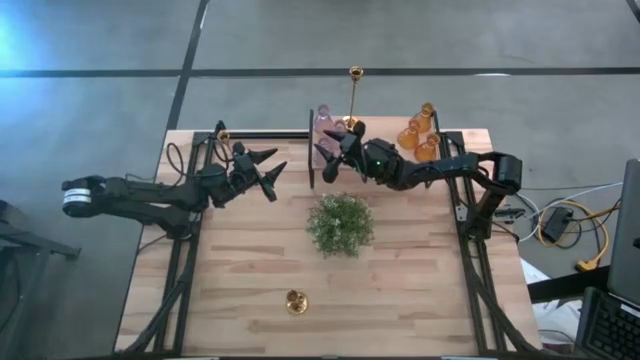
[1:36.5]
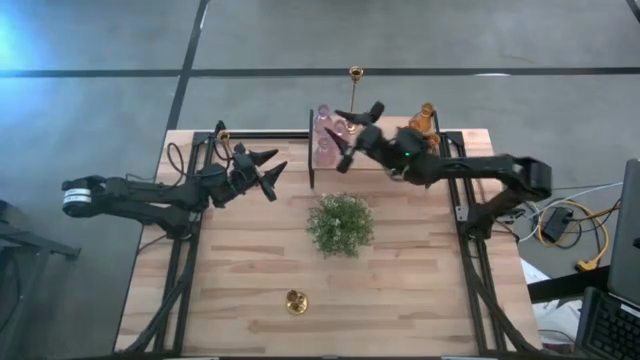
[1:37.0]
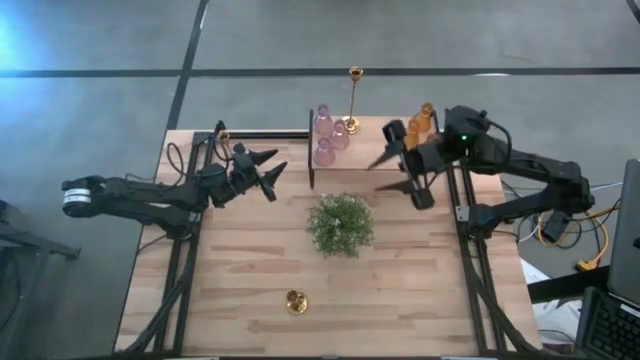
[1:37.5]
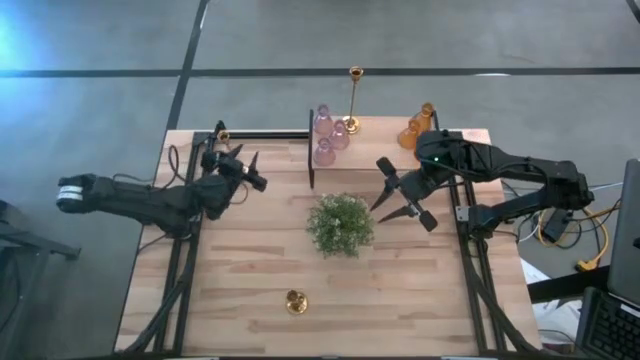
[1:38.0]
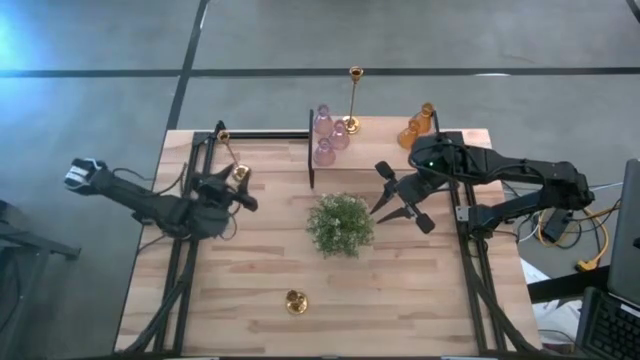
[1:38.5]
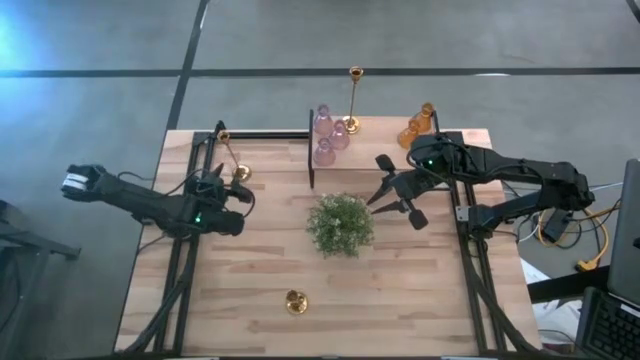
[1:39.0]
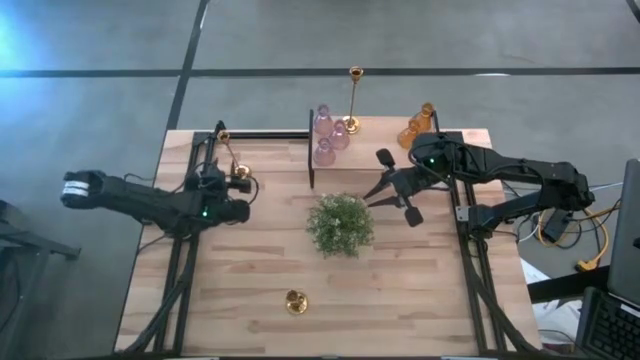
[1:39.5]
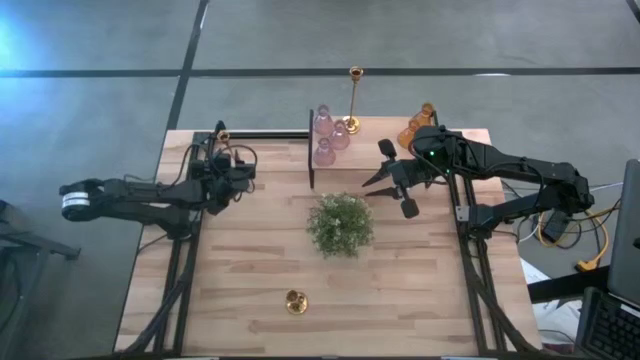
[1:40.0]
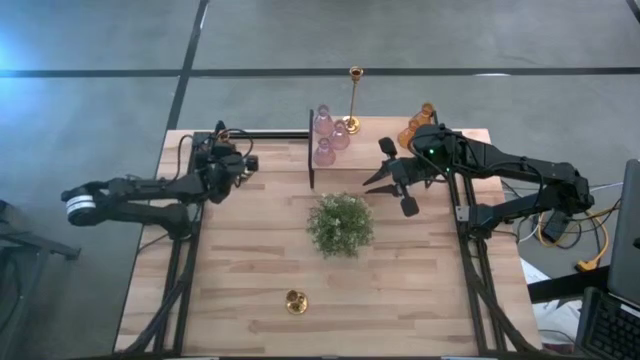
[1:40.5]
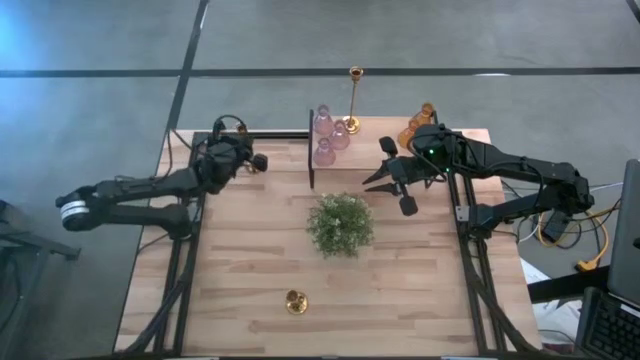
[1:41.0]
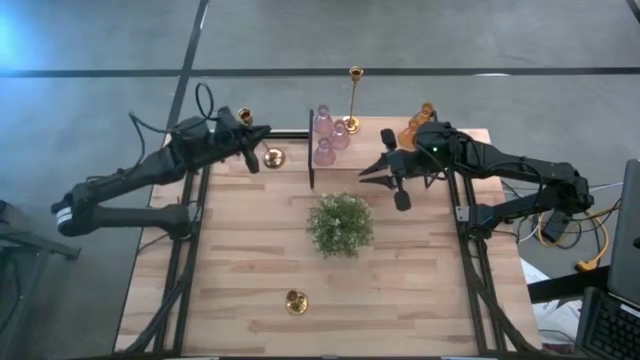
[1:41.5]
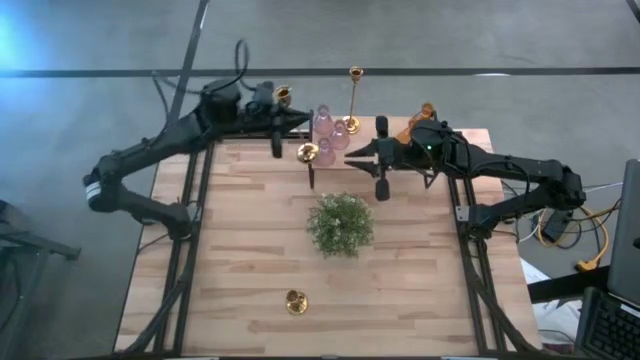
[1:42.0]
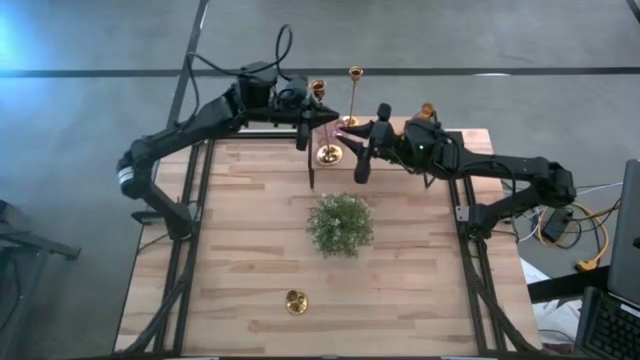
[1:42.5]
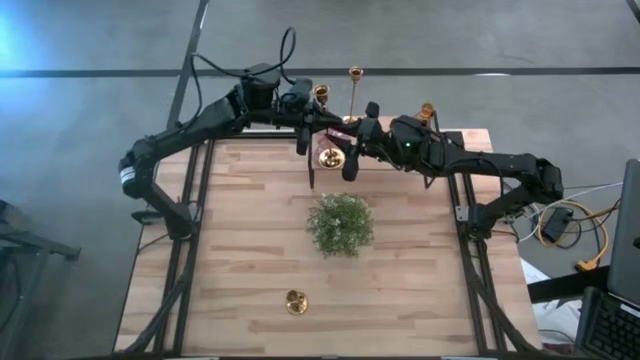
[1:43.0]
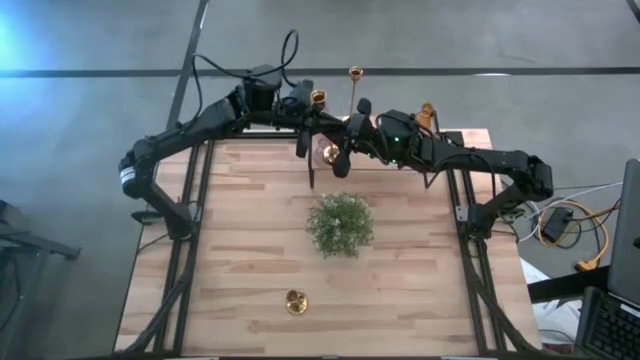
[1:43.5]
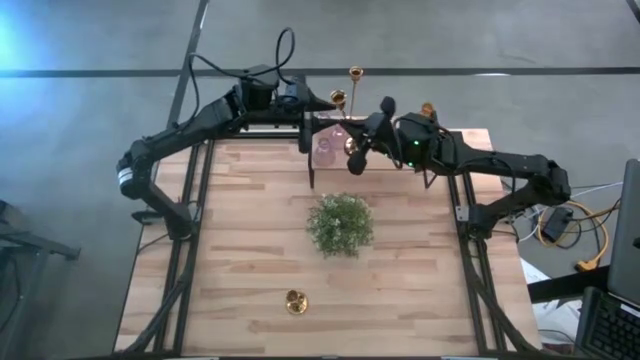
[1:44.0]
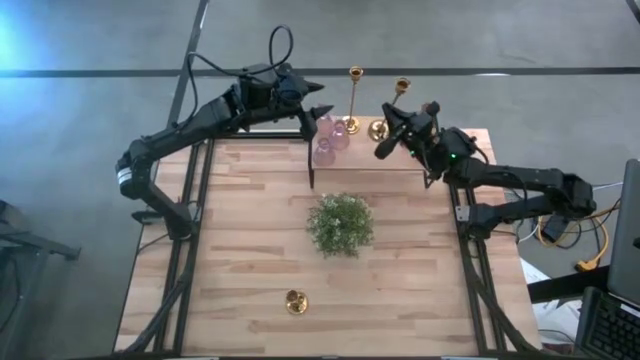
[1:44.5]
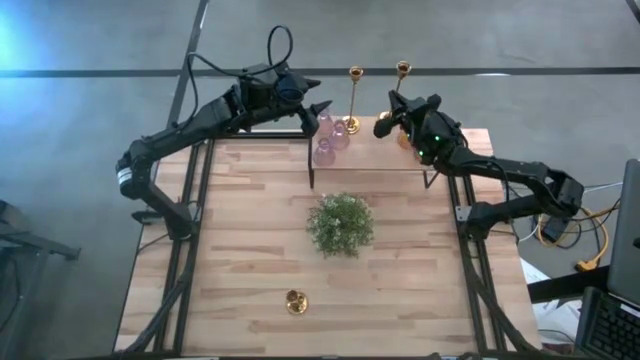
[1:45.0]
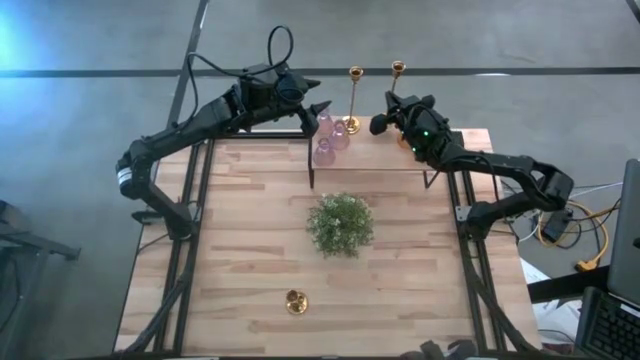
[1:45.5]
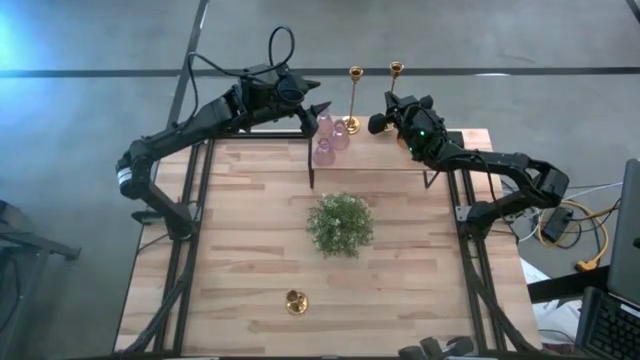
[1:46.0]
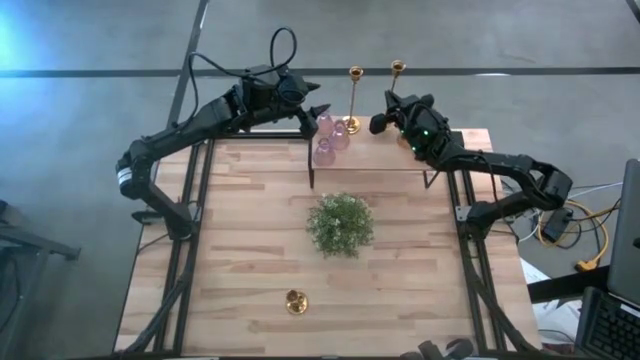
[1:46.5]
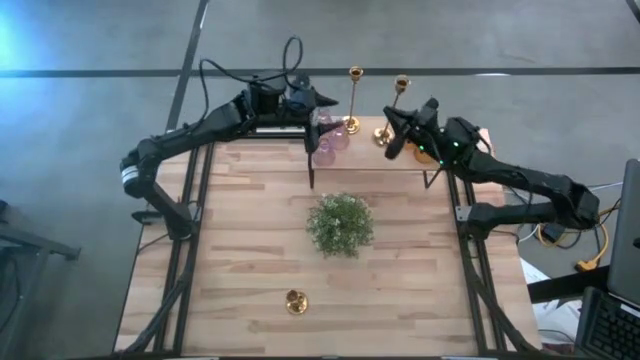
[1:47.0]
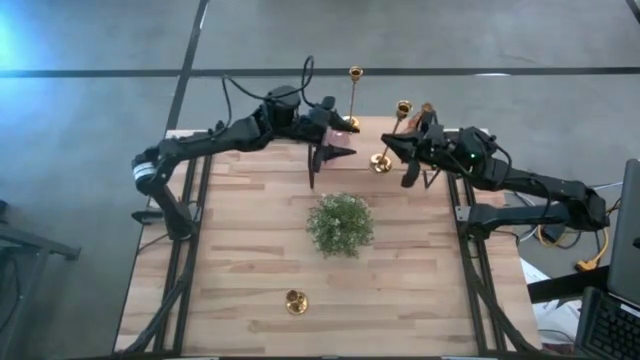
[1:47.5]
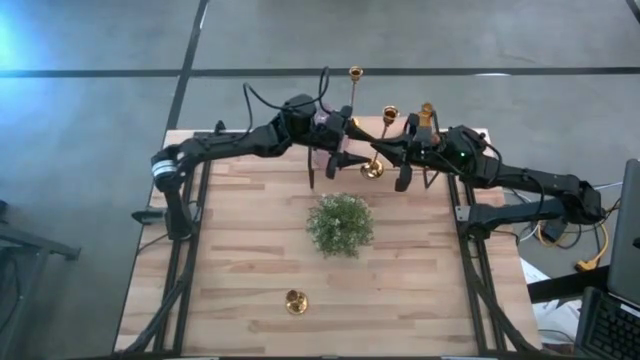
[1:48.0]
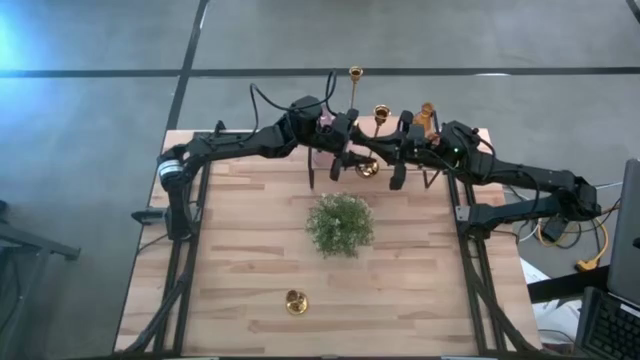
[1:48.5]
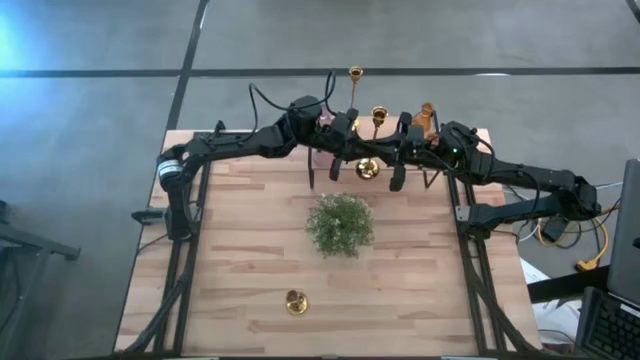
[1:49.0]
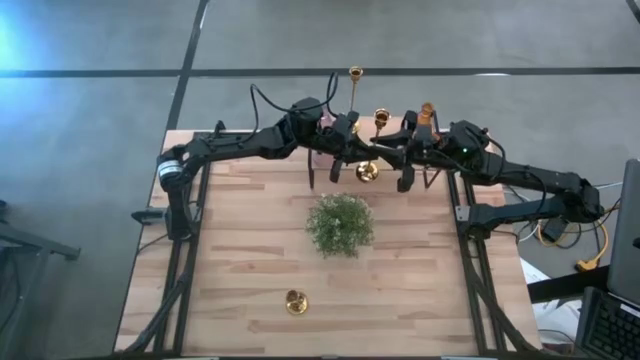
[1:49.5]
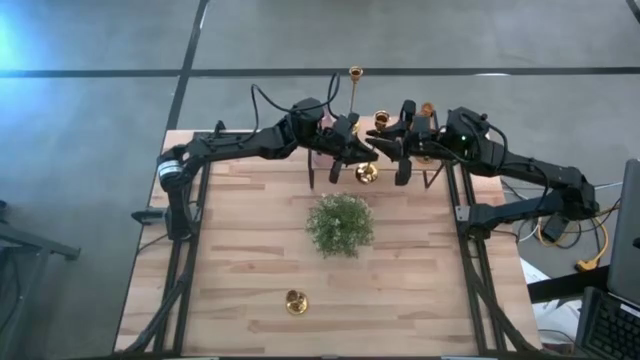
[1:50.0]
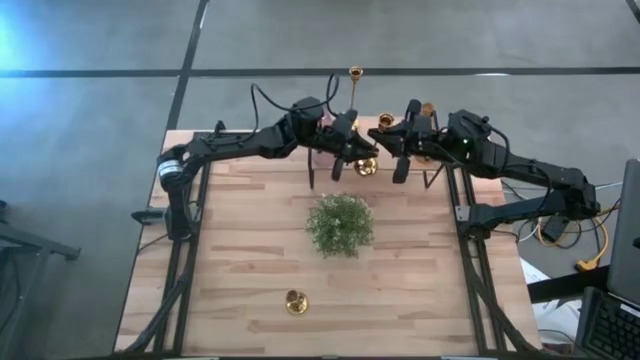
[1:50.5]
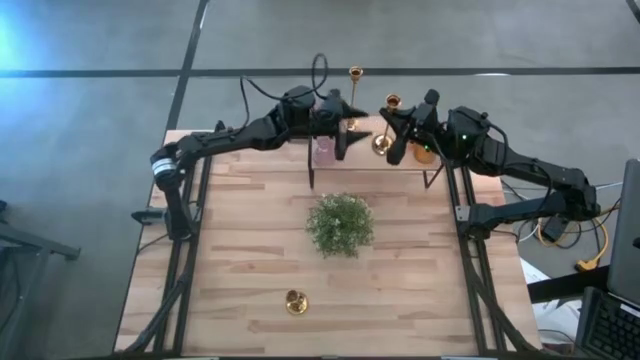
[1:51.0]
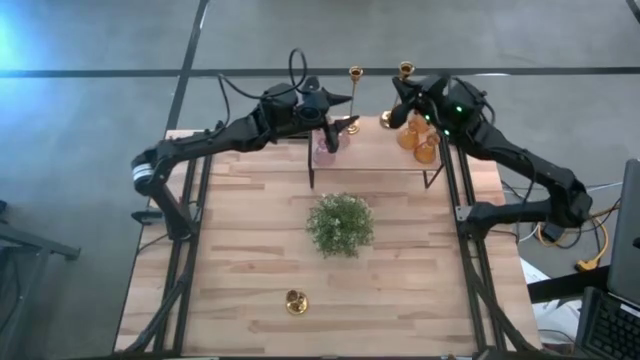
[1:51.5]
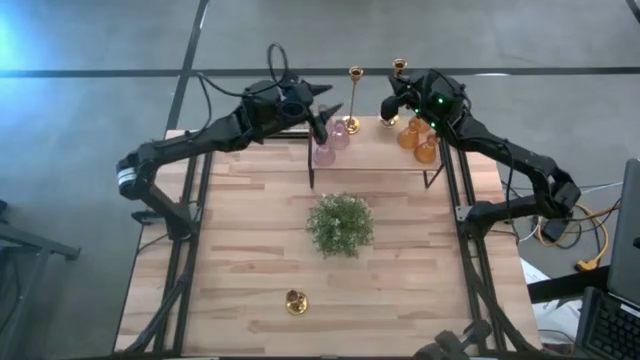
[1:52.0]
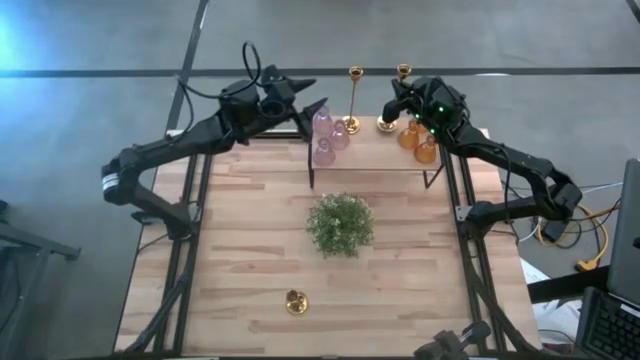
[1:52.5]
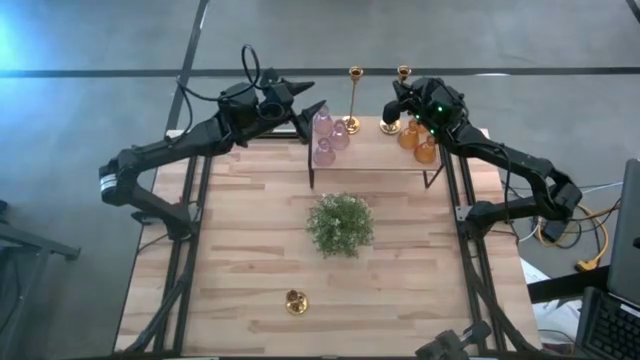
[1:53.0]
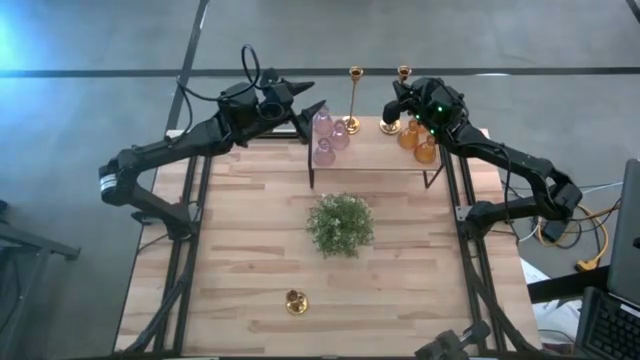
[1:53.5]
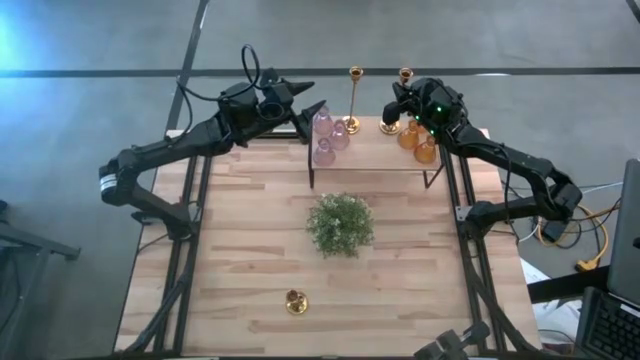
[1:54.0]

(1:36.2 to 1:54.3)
Task: Pick & Place candle stick holders
Put the large top left golden candle holder on the shelf

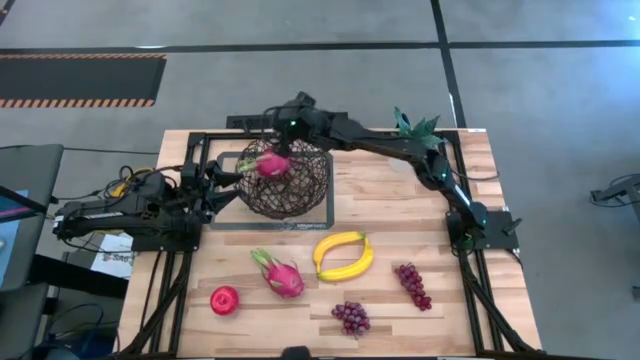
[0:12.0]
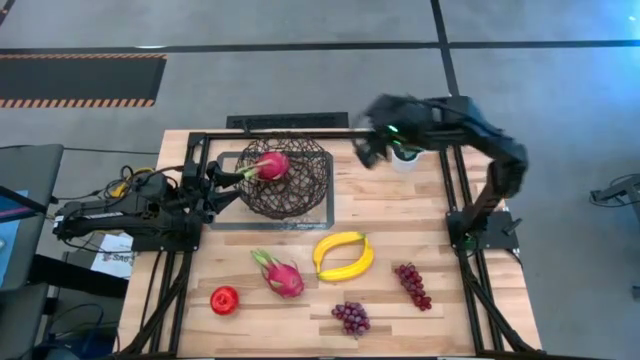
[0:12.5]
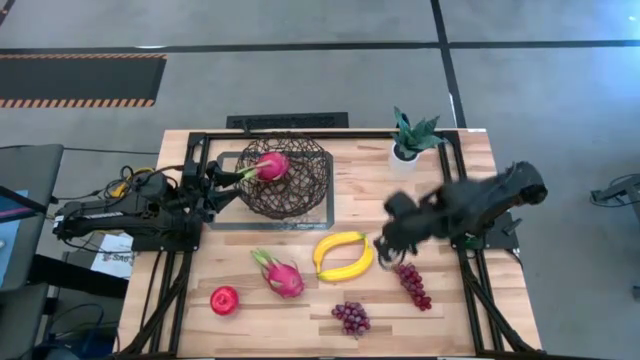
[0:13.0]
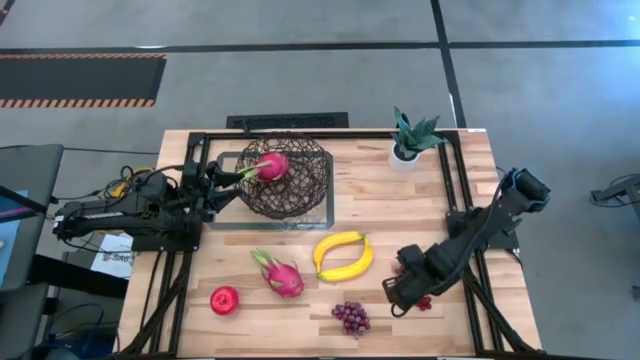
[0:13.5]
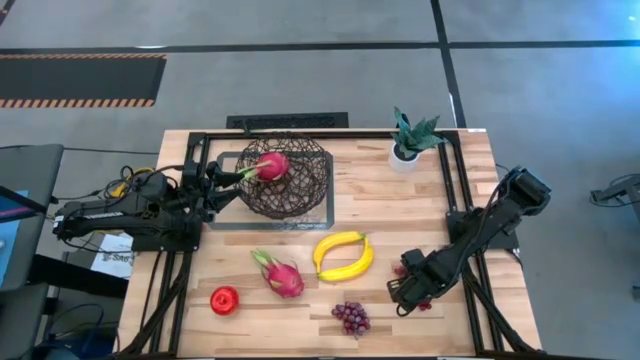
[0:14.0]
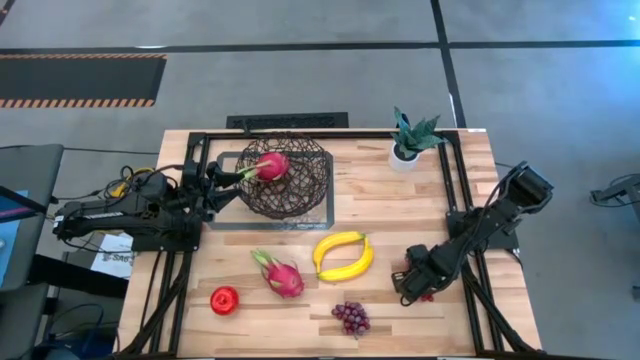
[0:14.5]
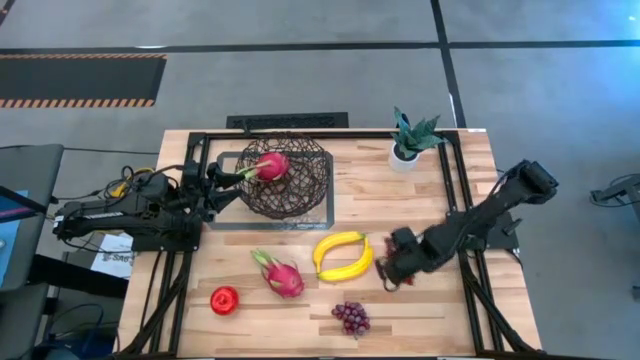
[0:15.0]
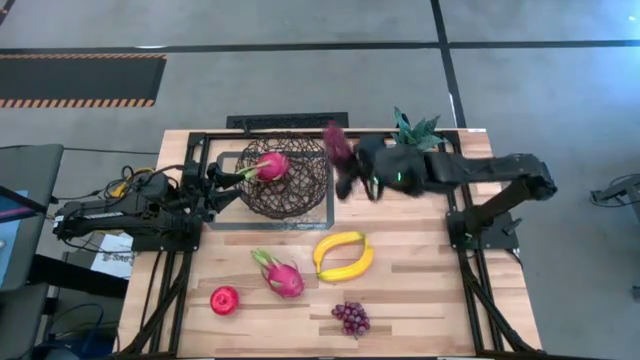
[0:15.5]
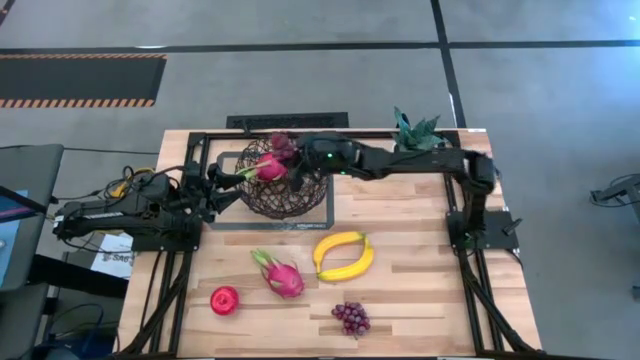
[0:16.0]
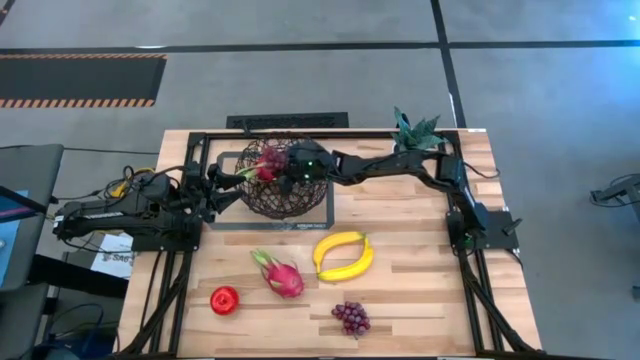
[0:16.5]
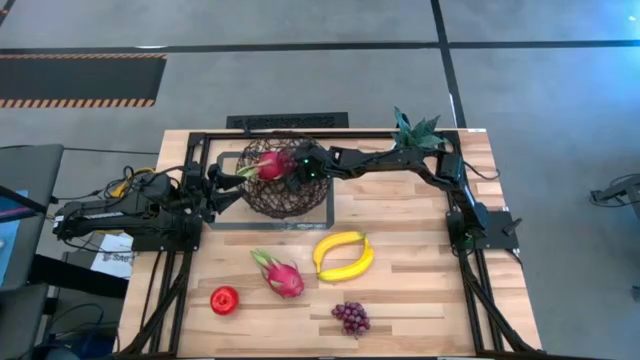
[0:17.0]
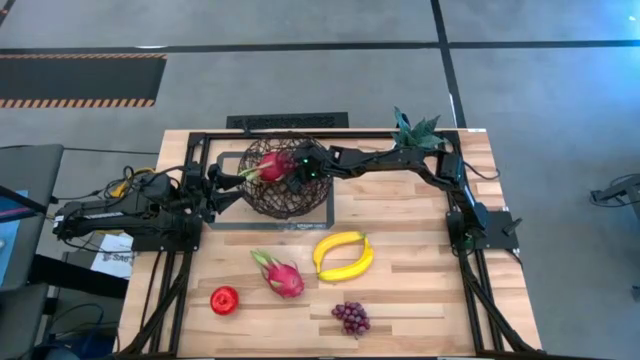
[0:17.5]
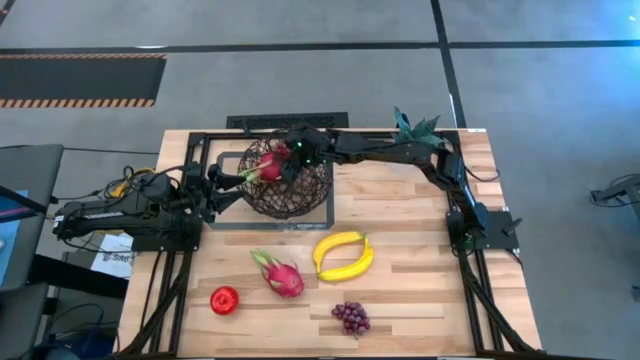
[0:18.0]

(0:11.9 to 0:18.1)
Task: Build produce basket
Put the right purple grapes into the black wire basket
